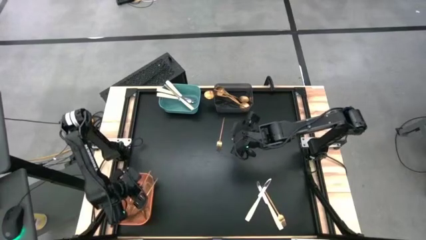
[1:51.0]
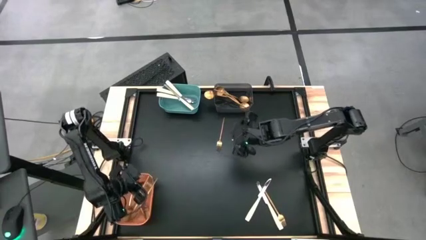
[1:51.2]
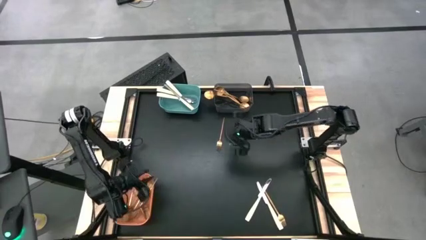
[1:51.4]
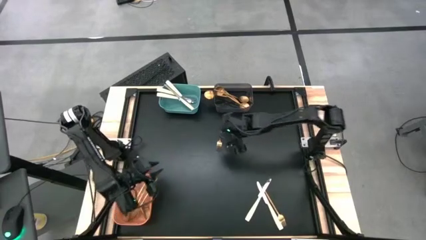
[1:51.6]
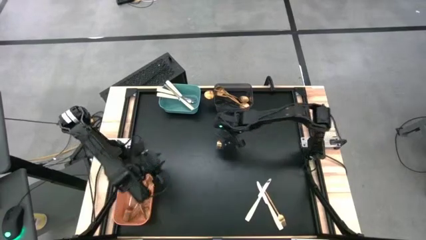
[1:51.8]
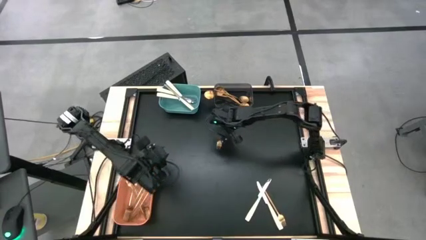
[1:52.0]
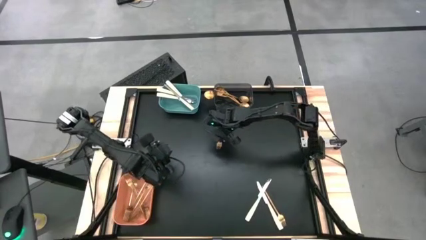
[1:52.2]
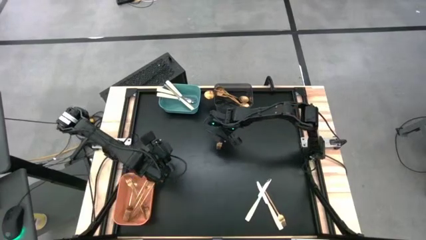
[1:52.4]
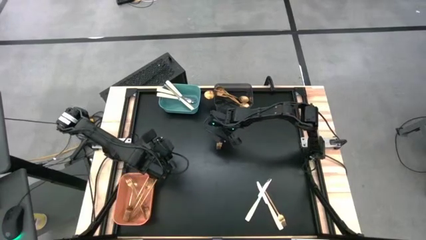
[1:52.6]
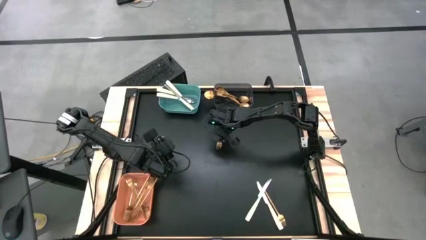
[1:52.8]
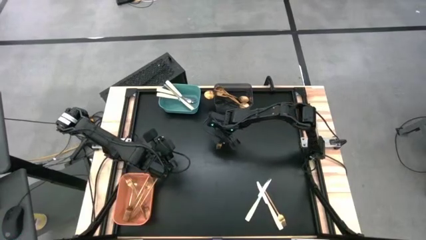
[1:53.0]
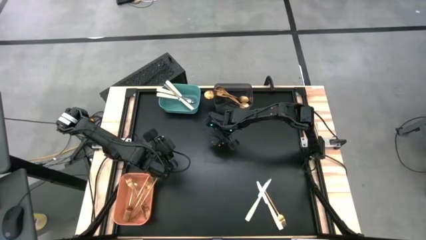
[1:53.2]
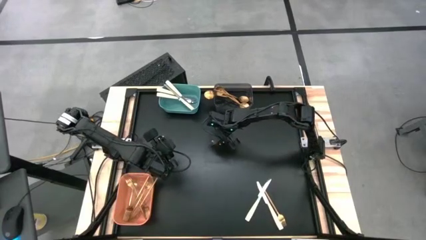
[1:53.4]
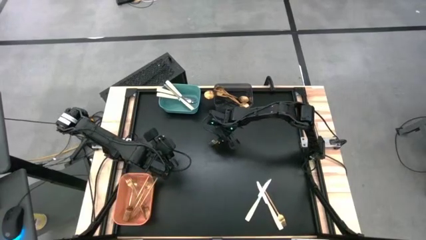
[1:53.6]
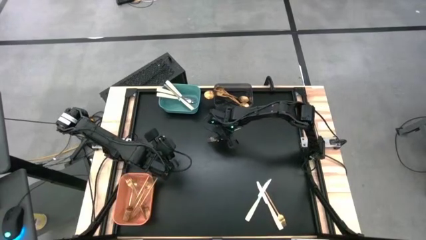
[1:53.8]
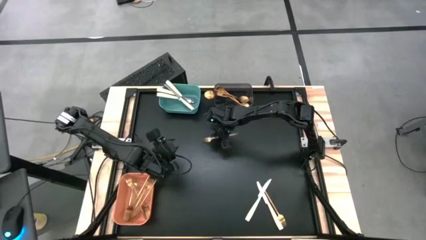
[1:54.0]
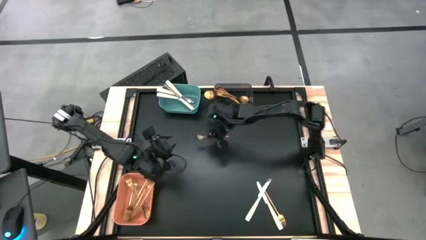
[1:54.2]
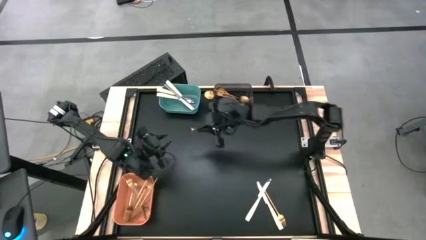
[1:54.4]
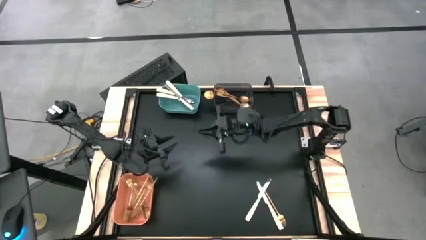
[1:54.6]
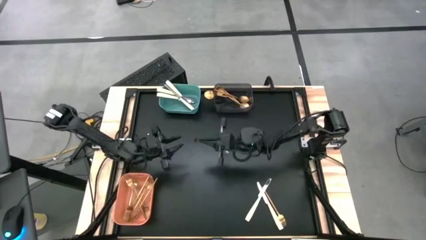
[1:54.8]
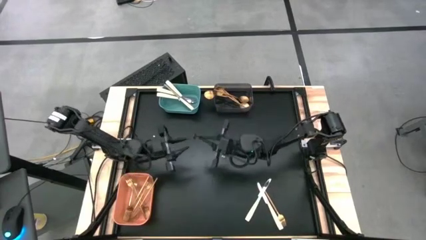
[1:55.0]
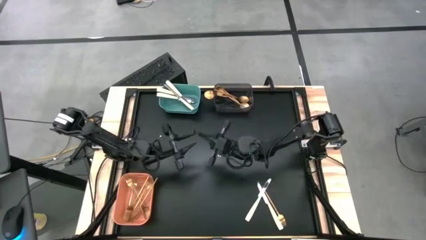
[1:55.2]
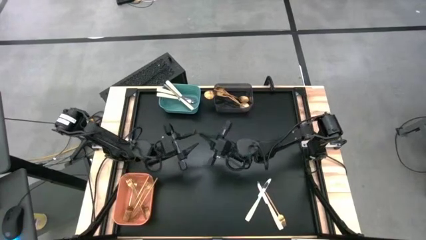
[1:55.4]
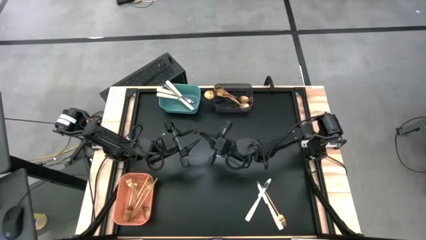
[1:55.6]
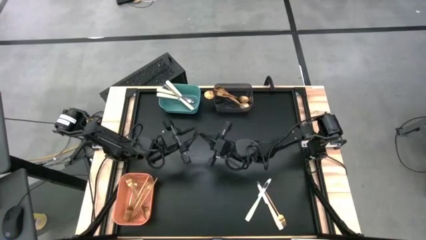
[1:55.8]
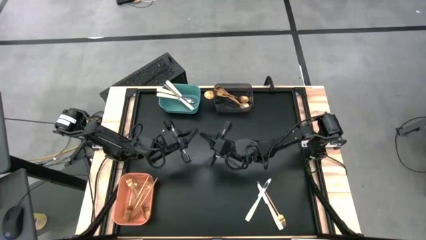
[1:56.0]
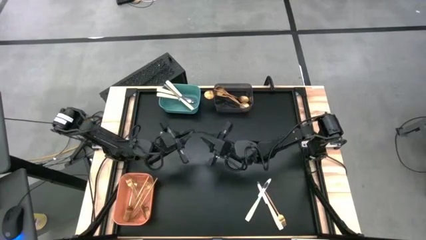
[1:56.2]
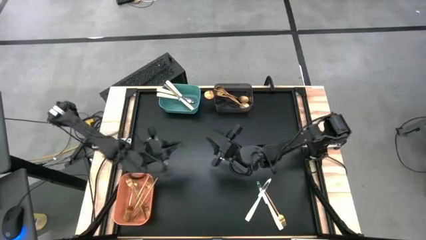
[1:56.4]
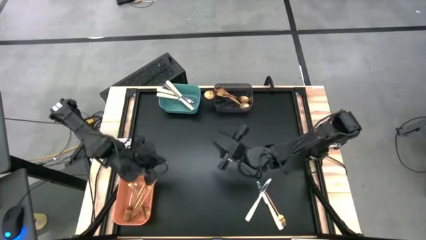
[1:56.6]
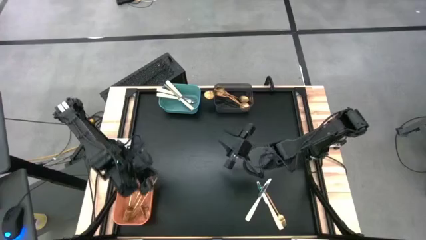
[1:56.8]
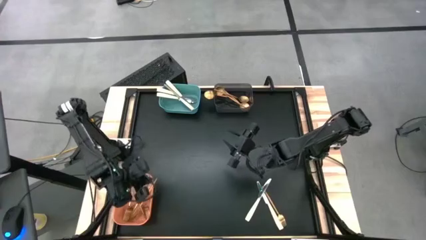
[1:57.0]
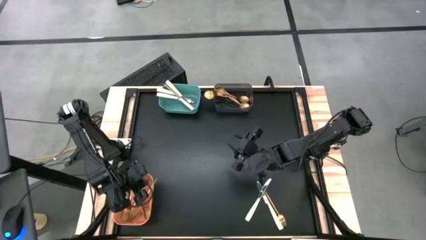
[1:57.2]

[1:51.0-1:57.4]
Task: Sort silverware by color (type)
Put the gold fork into the orange bin

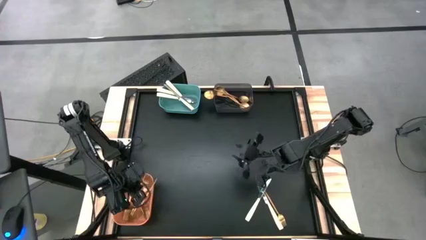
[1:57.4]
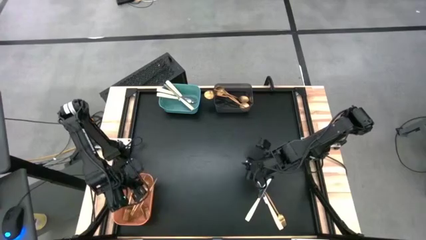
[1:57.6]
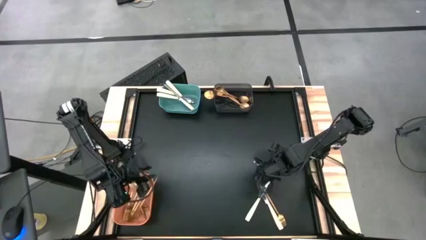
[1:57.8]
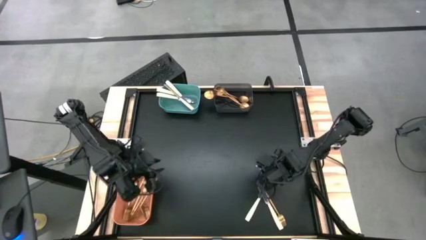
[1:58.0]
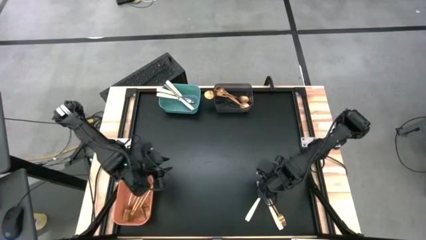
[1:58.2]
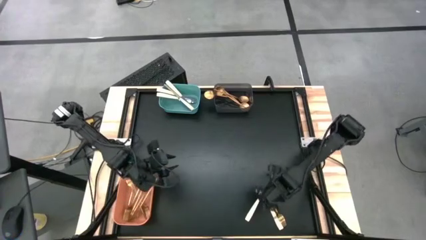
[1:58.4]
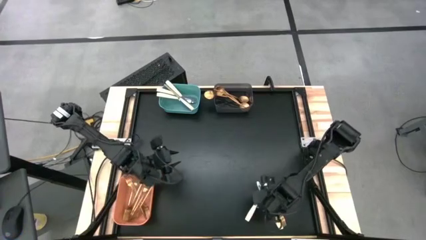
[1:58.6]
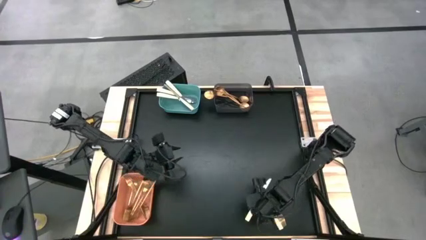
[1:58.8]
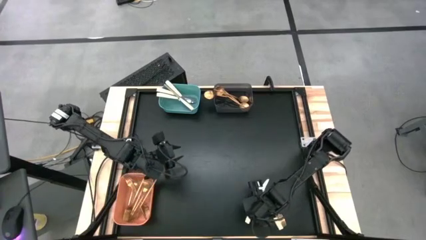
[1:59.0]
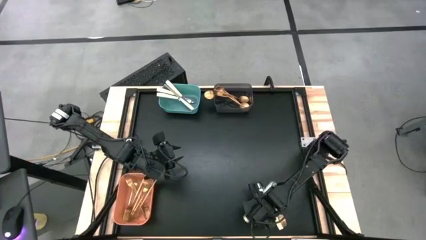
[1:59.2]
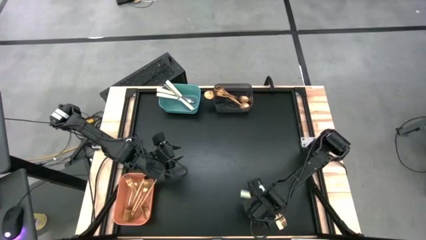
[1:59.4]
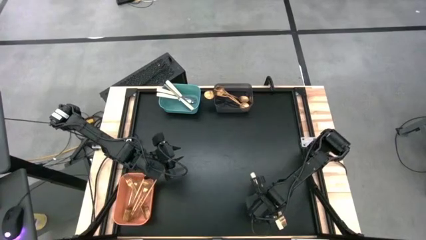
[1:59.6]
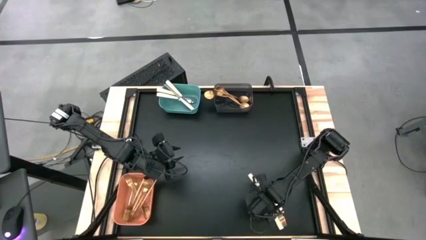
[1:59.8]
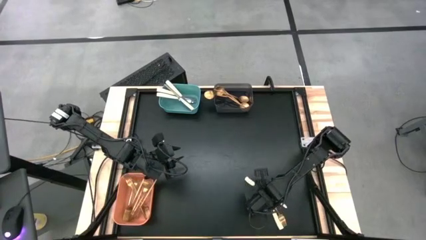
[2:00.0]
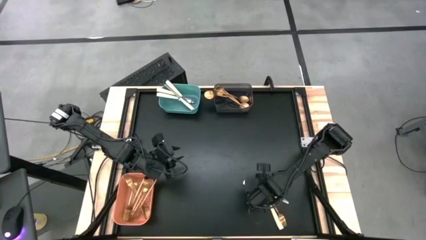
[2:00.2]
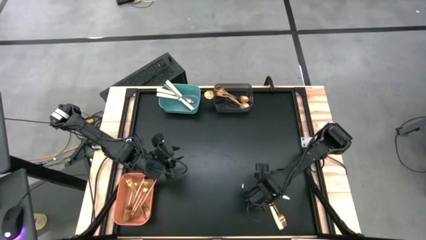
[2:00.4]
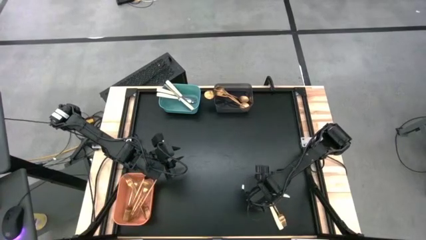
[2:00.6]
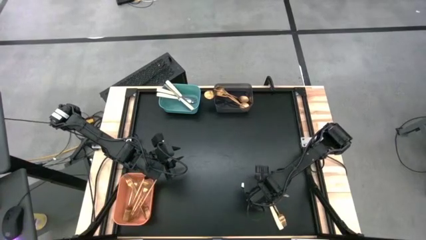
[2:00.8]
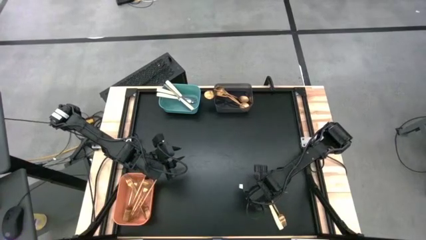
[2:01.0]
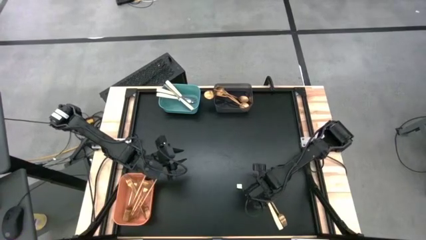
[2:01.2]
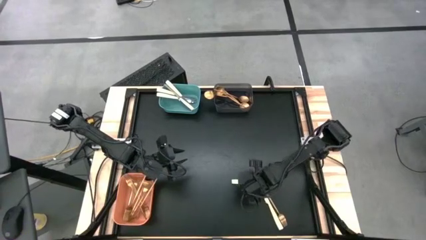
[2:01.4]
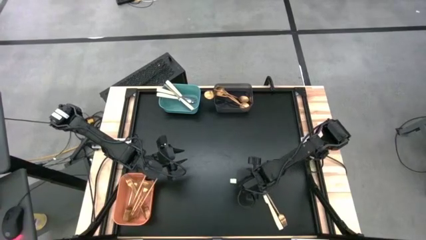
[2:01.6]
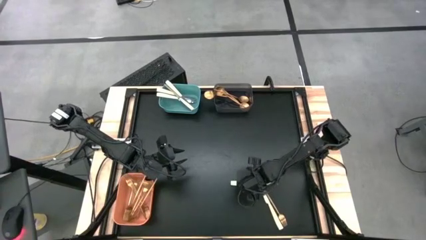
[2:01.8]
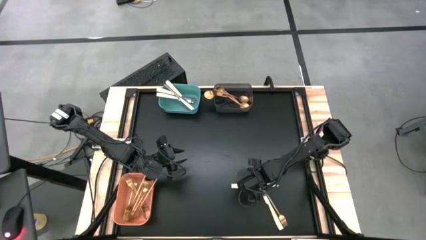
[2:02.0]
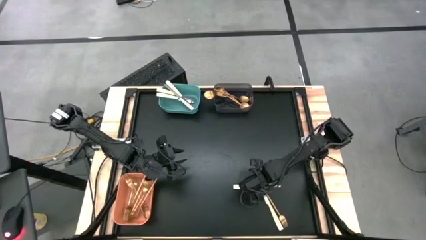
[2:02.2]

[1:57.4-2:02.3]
Put the silver knife into the light blue bin

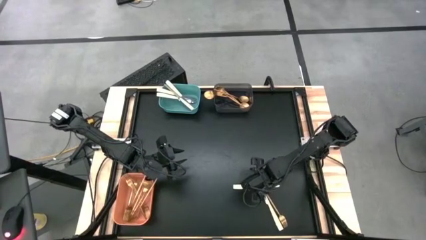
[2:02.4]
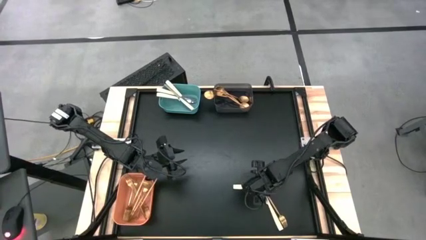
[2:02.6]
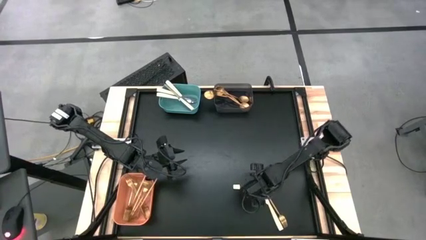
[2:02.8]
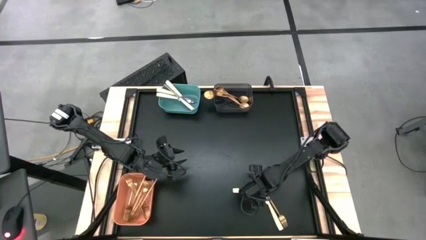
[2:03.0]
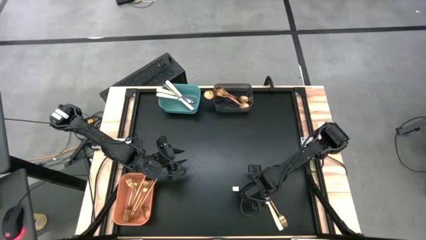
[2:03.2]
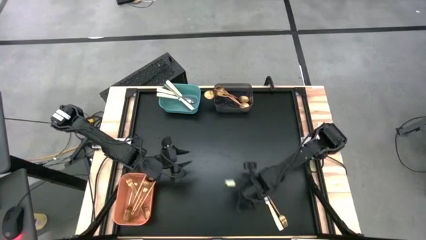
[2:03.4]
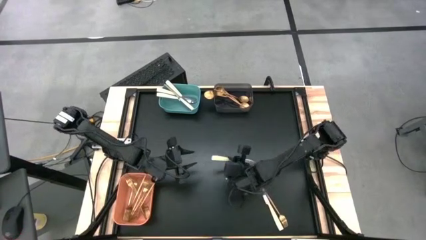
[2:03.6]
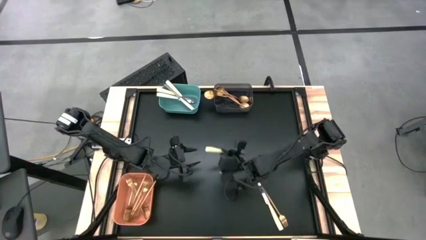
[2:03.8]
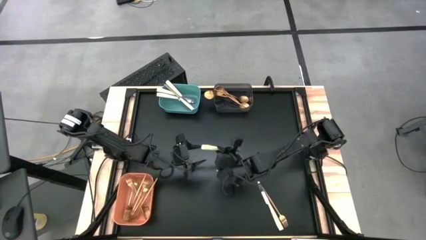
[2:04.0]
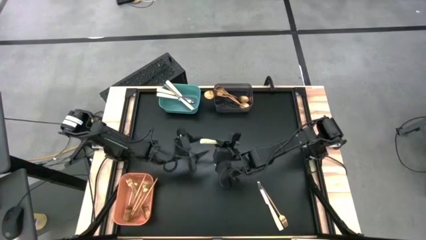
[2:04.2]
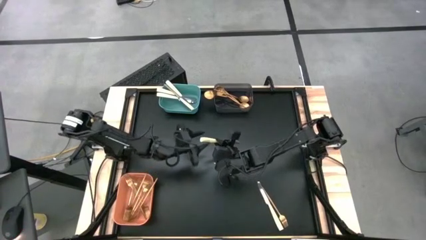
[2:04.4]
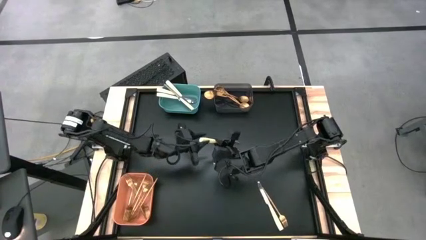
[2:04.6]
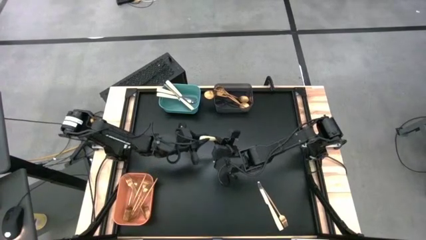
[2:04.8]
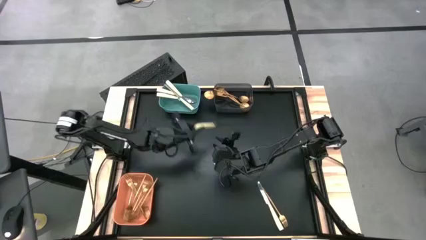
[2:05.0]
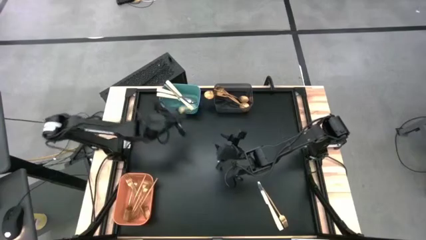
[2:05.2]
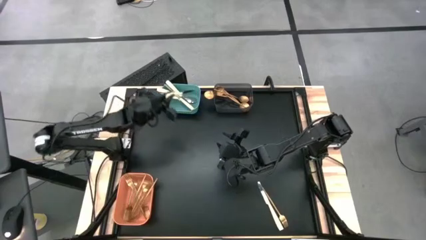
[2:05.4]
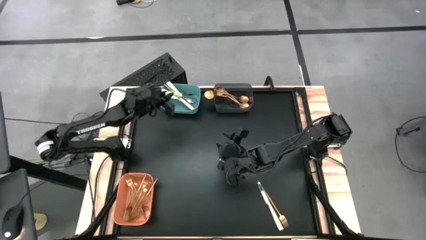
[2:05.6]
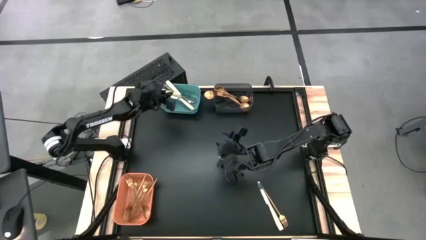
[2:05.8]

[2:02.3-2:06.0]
Put the silver knife into the light blue bin

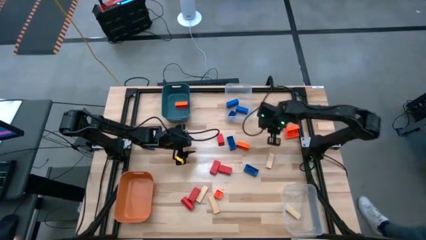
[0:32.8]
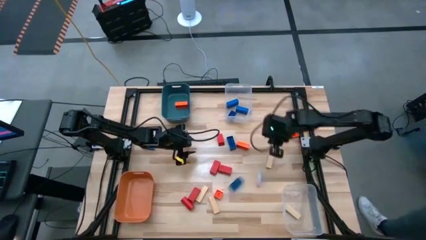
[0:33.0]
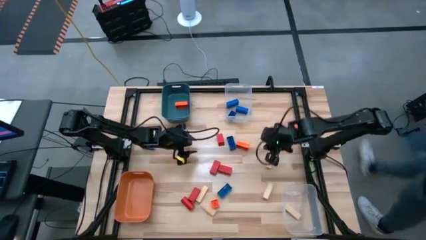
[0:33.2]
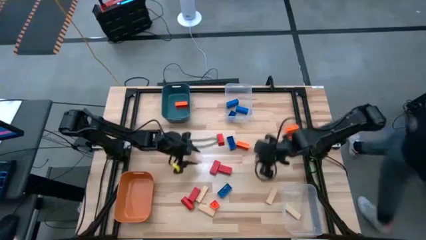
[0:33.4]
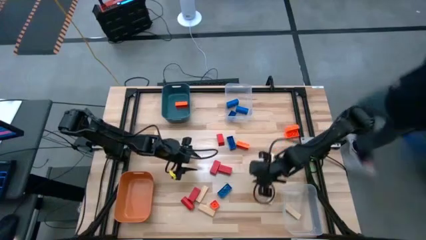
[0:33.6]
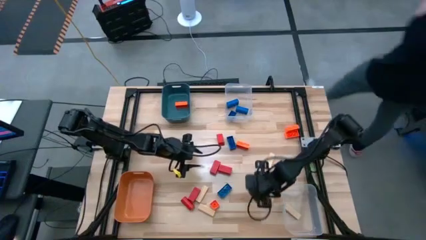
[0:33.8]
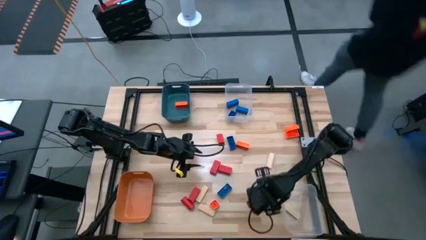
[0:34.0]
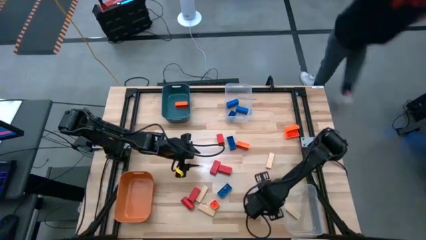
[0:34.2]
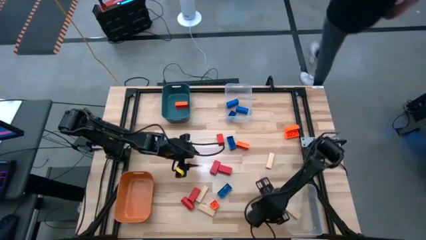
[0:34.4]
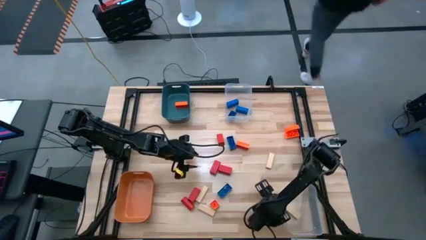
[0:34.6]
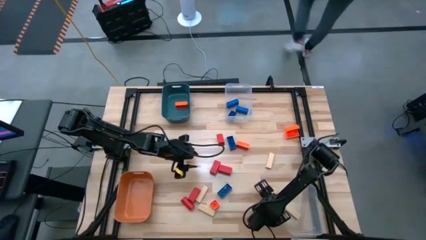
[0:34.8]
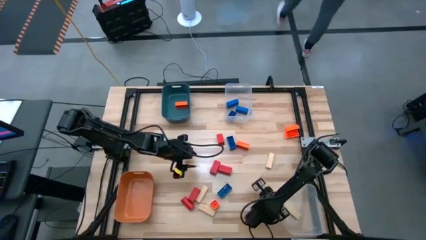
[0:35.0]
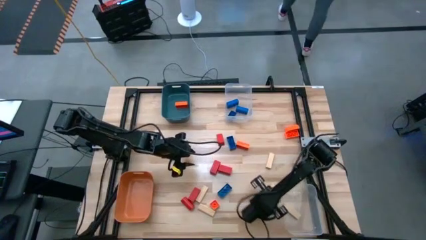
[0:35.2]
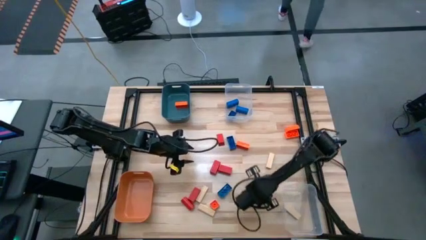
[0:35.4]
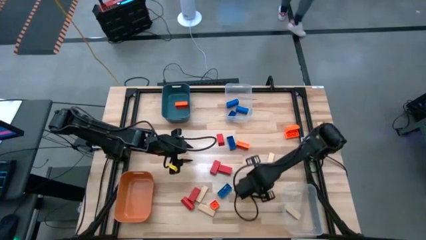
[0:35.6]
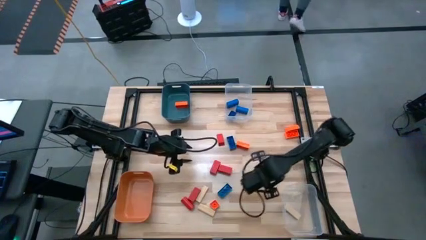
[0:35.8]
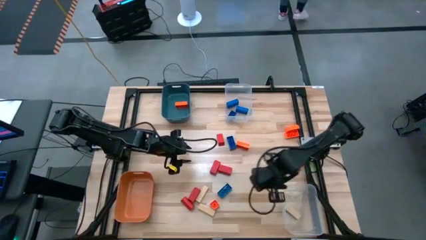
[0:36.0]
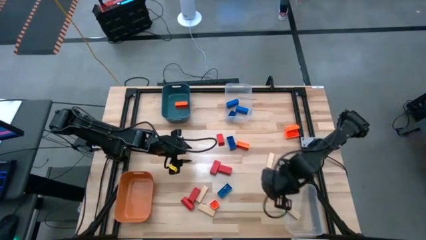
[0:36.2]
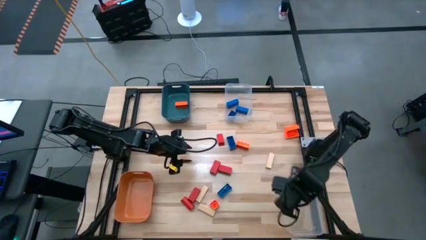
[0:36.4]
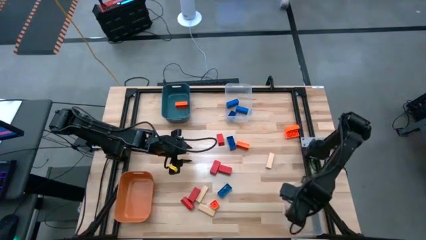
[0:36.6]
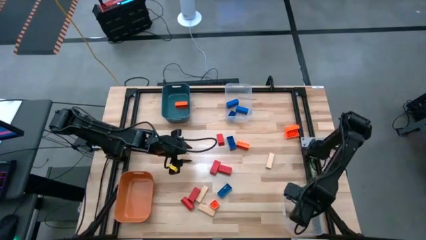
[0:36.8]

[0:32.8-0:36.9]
Task: Sort blocks
Put the brown block into the bottom transparent bin
